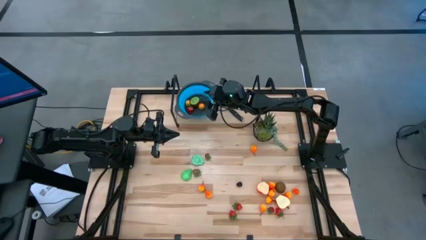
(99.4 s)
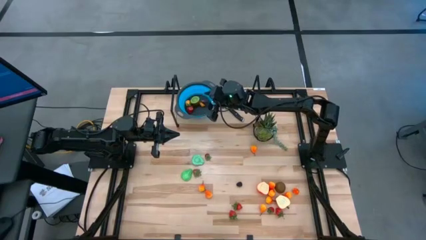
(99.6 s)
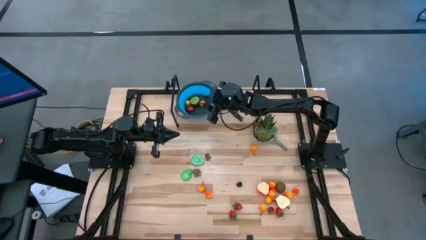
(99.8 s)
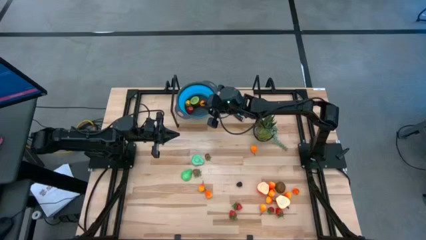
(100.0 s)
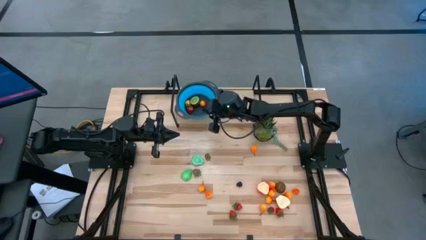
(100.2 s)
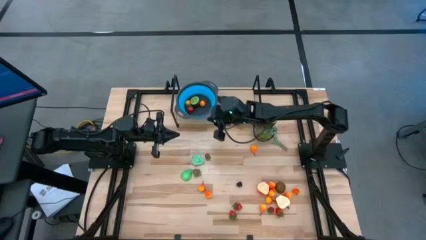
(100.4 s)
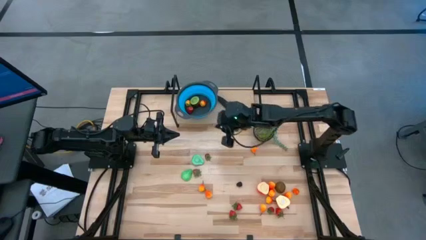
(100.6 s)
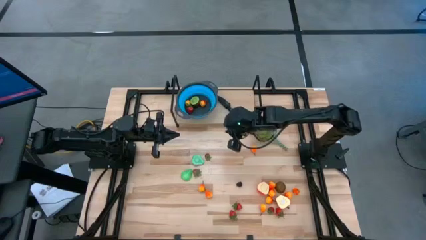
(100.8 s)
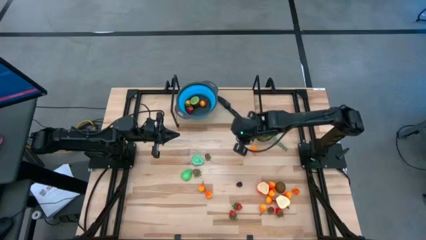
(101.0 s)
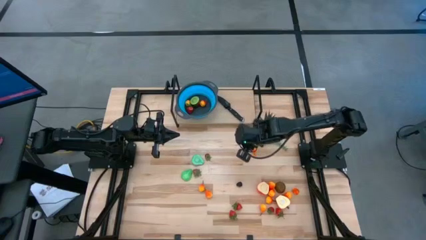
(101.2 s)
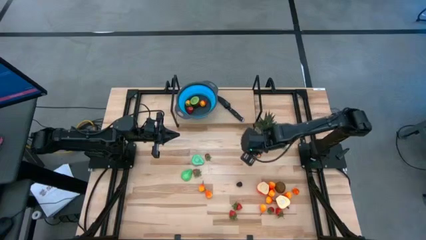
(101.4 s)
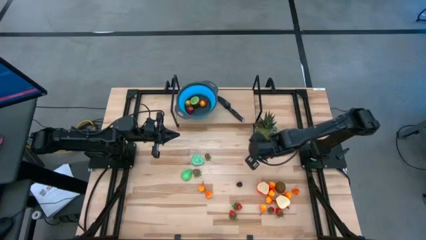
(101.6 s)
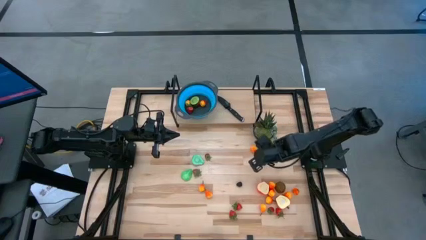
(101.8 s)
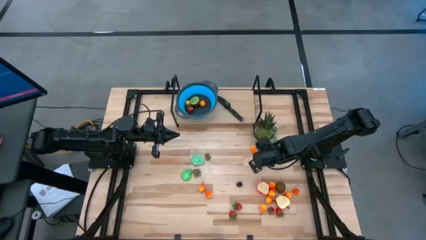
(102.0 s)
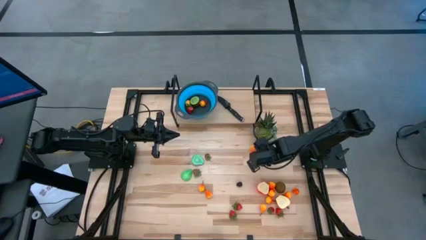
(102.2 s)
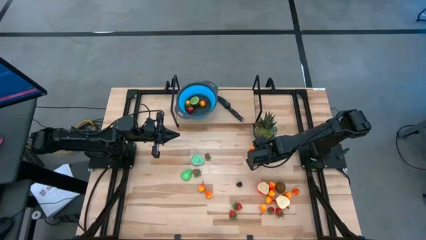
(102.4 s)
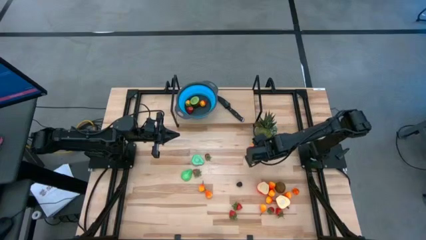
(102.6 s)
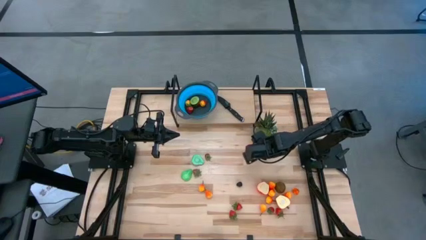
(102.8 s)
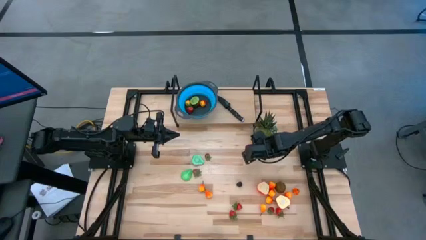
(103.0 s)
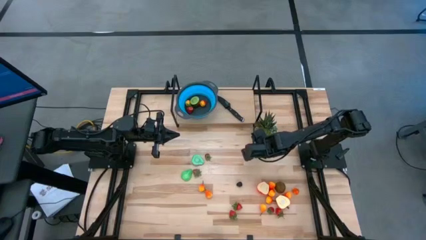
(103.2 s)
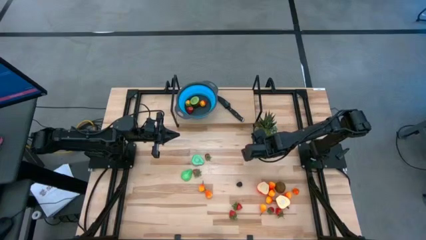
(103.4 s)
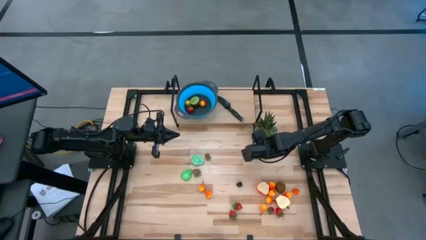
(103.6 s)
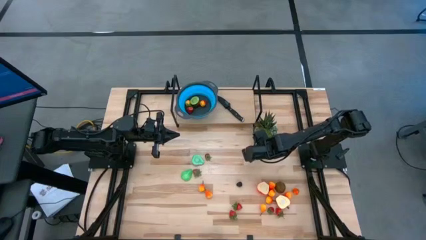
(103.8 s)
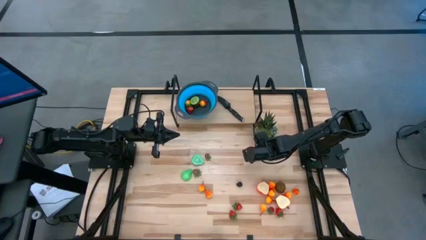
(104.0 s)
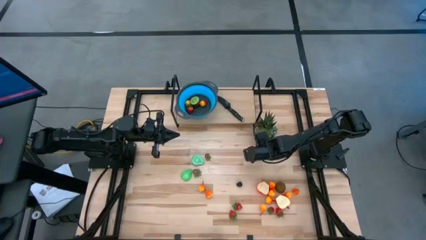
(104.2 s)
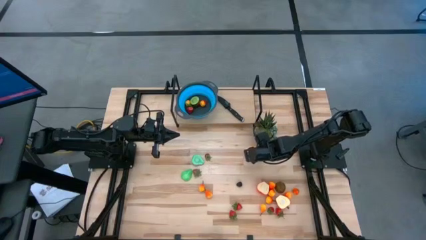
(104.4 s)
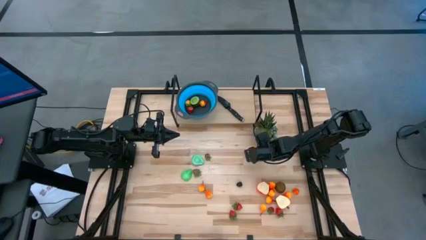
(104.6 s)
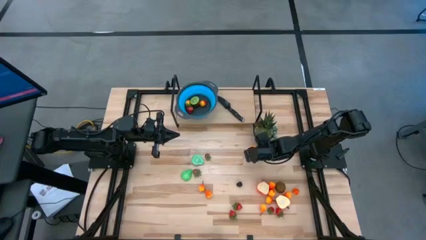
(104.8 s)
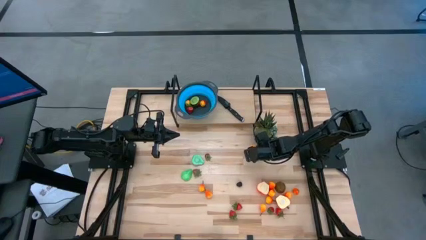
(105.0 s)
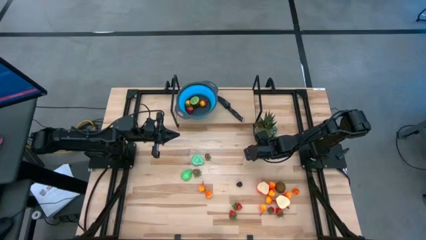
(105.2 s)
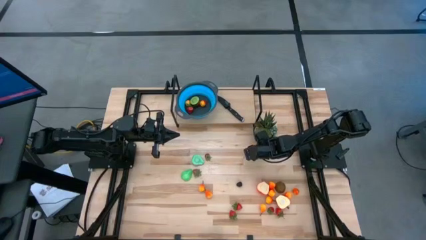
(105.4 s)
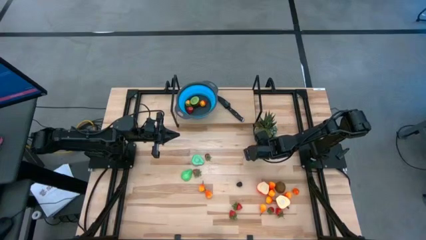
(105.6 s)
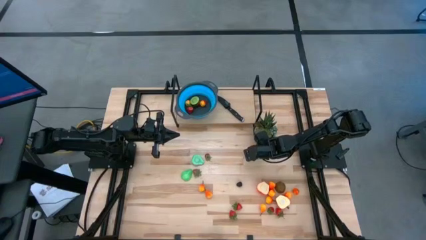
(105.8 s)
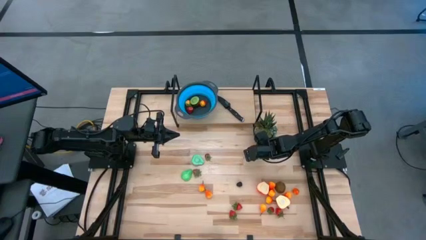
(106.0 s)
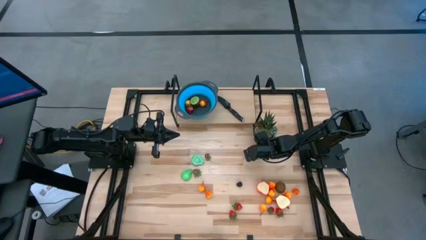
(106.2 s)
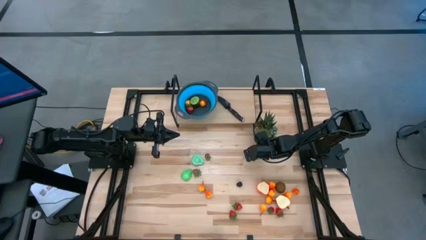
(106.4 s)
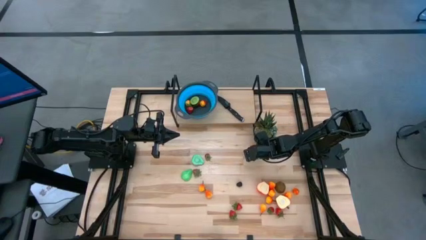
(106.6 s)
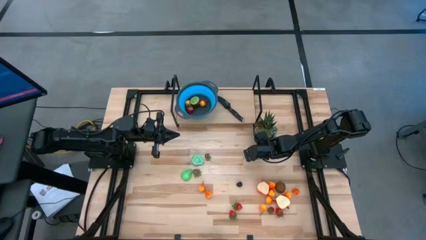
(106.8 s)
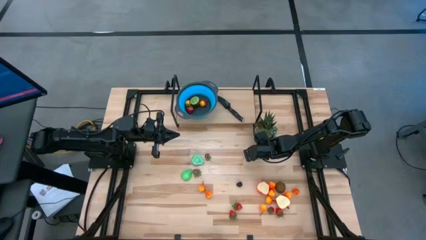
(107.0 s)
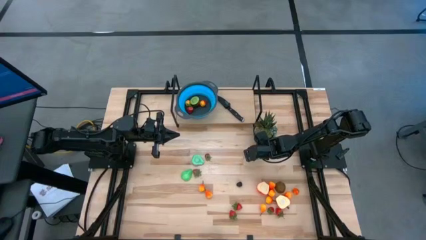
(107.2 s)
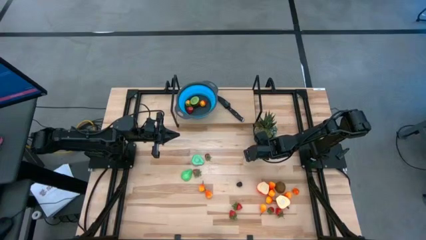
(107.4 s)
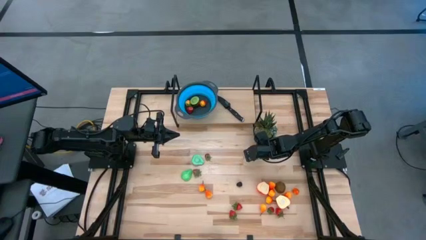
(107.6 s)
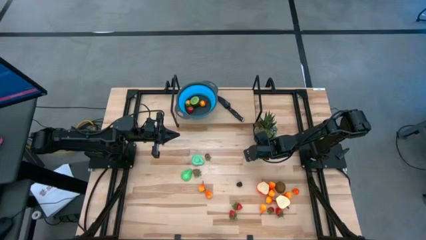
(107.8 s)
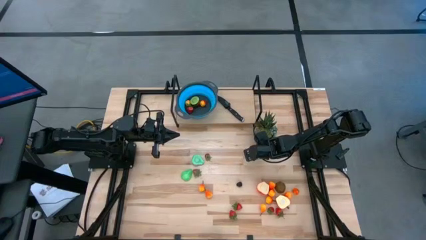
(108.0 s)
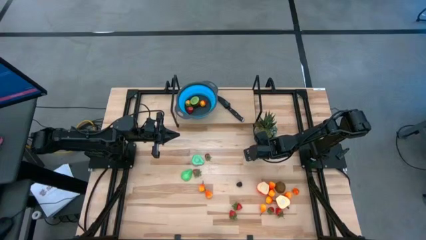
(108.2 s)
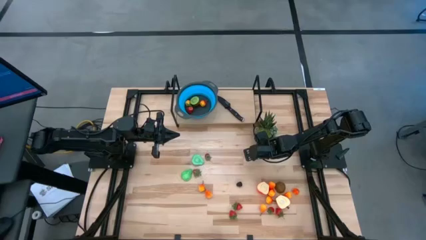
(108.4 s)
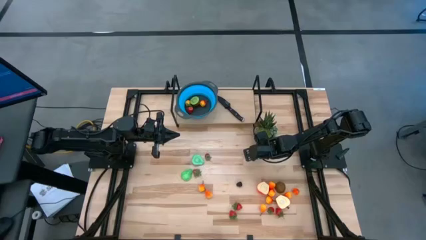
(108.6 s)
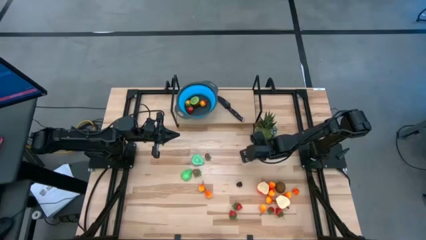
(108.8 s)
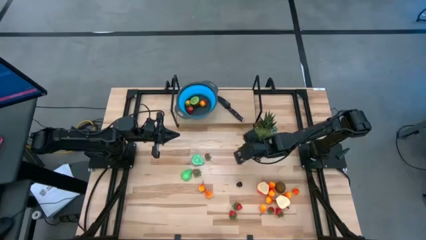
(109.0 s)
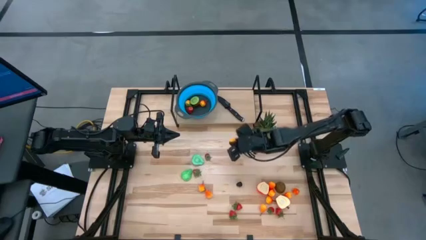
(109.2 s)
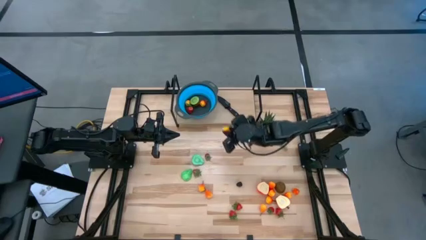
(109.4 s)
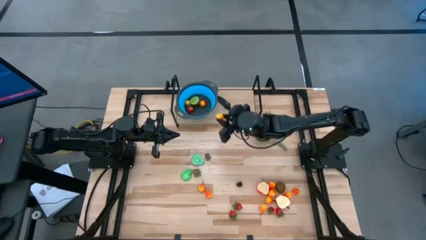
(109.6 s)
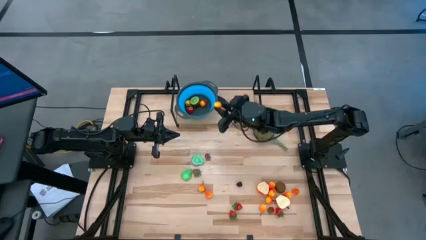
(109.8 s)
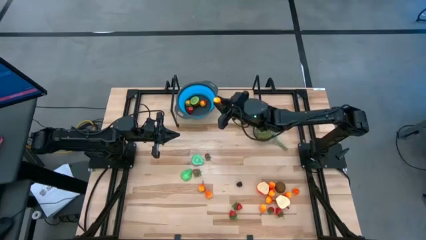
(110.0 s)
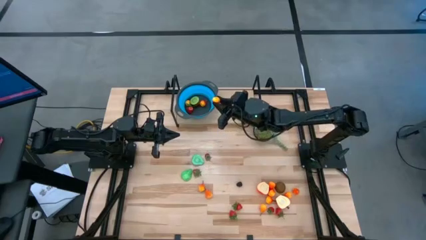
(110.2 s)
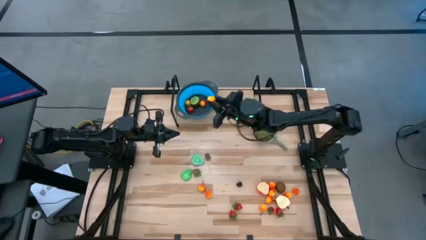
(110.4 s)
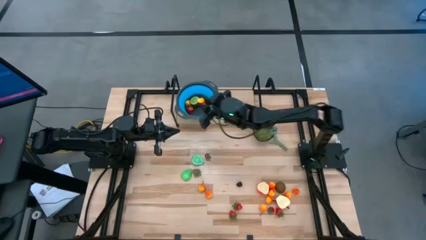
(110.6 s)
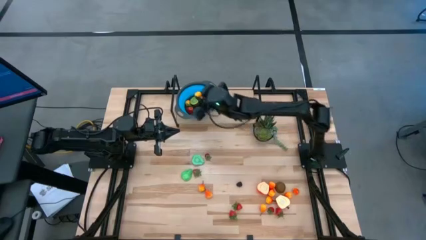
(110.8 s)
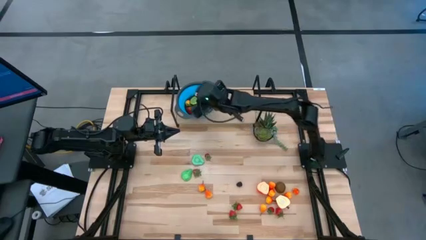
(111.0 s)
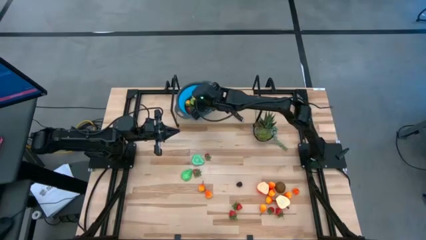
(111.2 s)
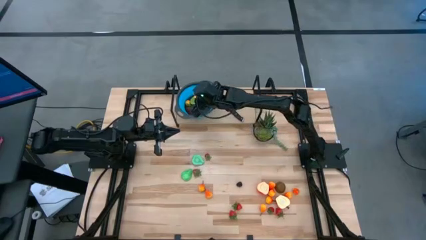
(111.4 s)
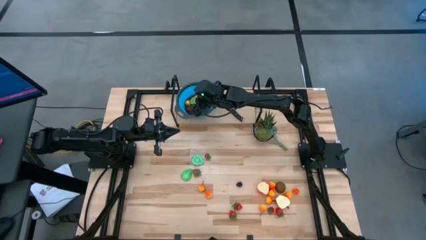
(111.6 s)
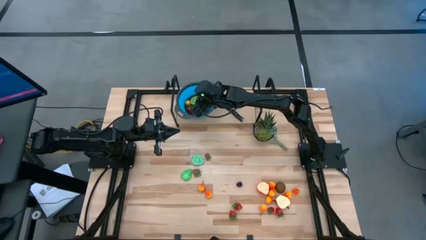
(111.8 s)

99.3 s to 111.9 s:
Task: Pick & Place Fruit
Put the pear into the basket

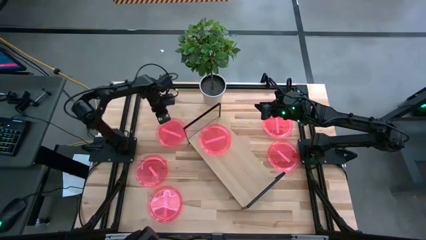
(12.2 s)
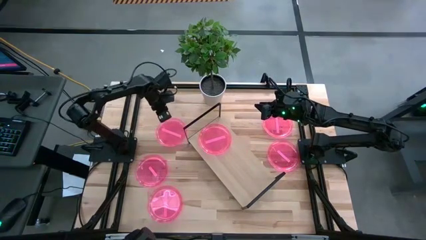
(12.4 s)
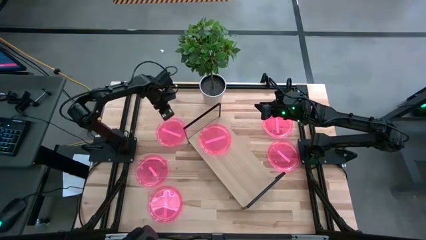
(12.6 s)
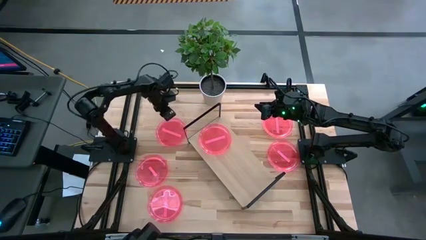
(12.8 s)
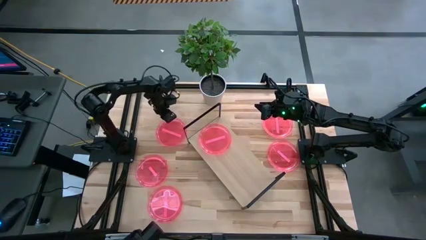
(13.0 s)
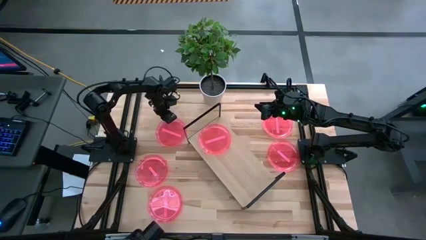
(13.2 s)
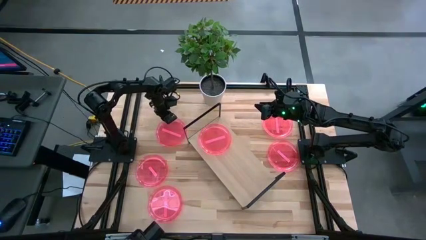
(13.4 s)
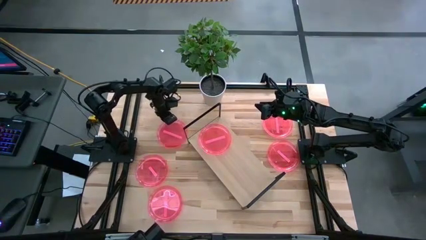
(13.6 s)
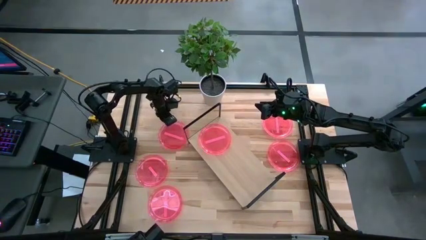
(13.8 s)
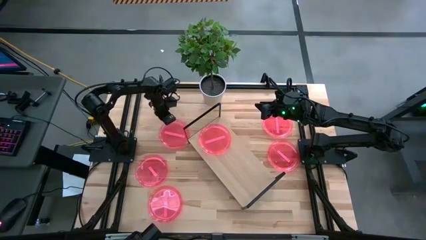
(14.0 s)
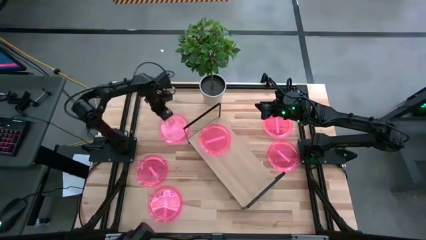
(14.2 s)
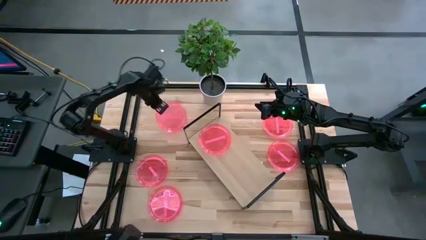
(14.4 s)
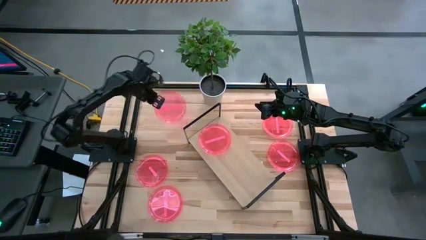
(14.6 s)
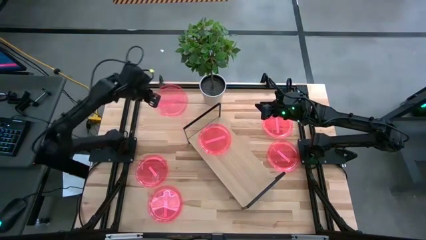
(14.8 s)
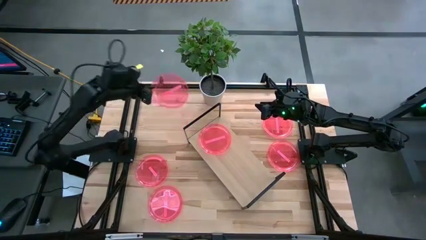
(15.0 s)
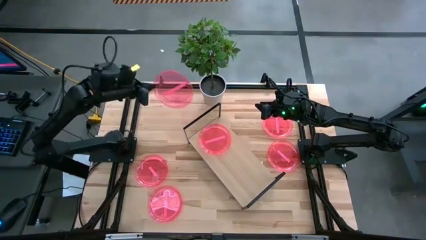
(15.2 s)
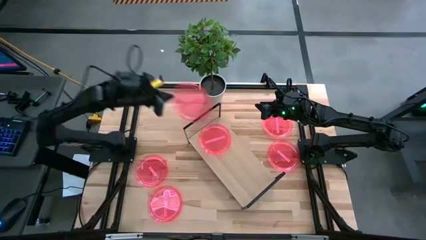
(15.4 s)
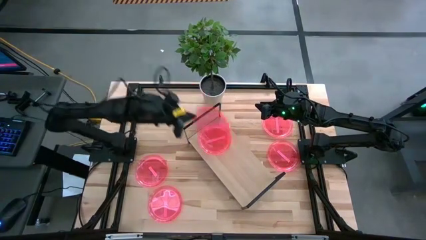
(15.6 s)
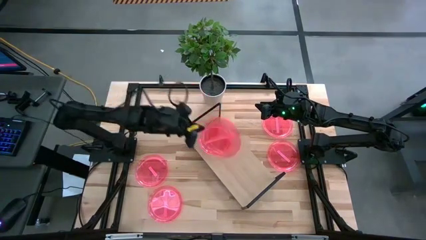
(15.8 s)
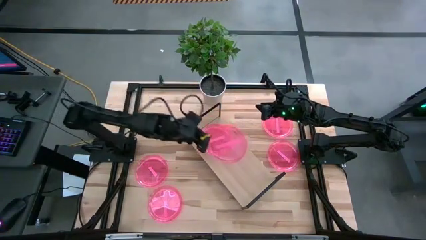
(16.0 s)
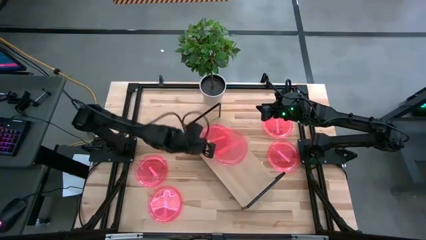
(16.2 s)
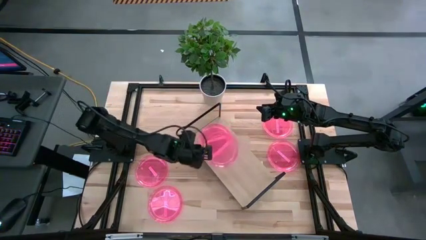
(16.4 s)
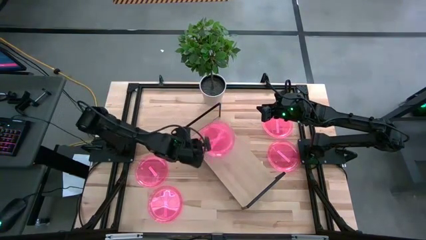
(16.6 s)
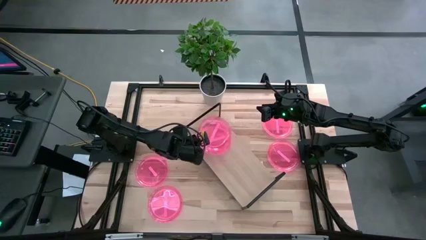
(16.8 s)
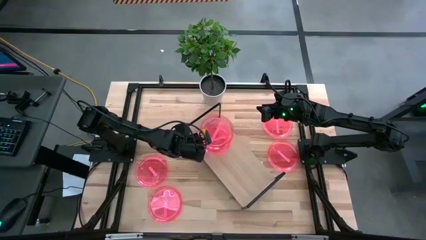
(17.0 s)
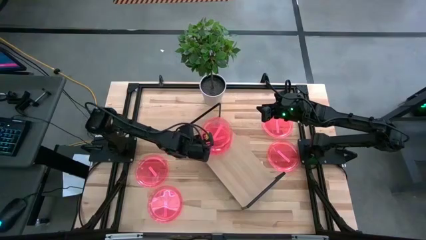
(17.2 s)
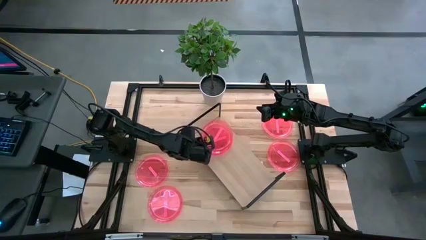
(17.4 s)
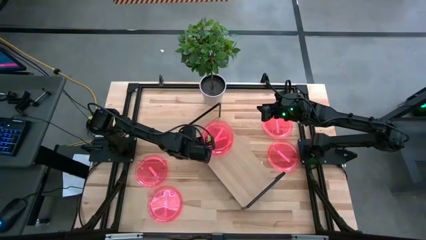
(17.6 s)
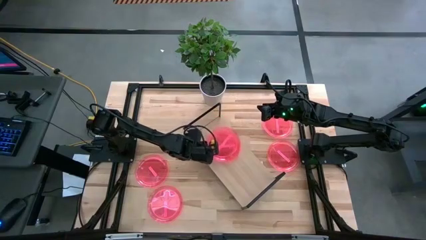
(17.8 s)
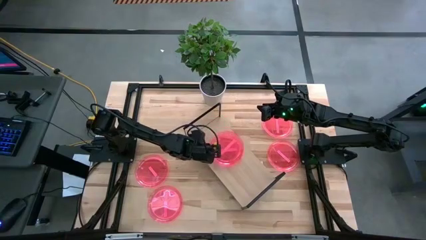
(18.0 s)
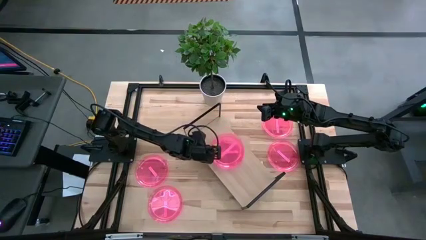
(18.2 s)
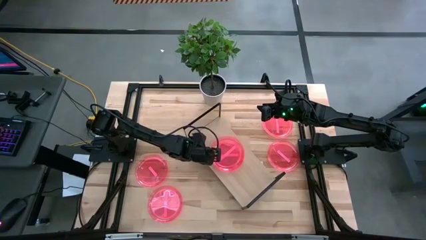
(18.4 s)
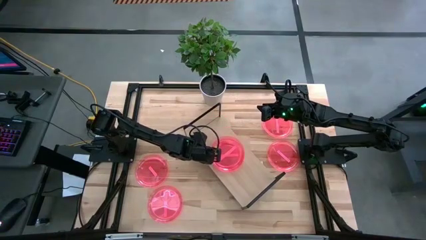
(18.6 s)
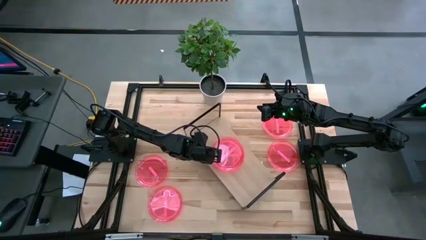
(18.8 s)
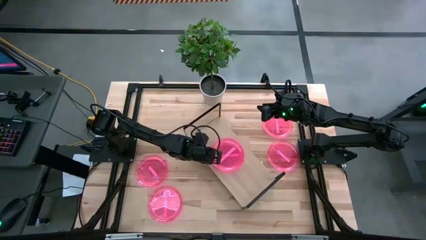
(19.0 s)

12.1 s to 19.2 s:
Task: Place and stack plates onto a shelf
Stack the pink plate on top of the other pink plate on the shelf
